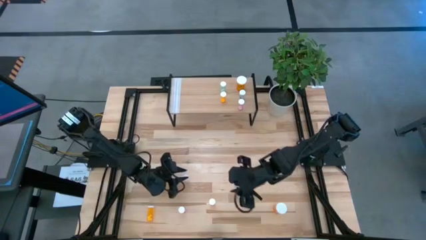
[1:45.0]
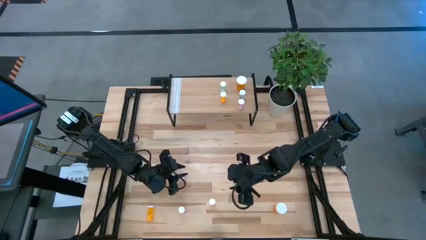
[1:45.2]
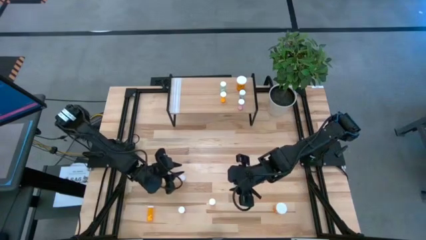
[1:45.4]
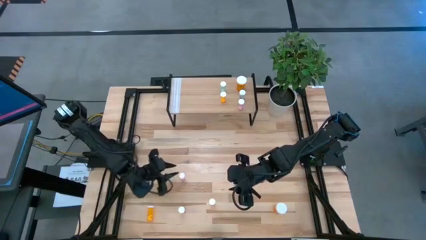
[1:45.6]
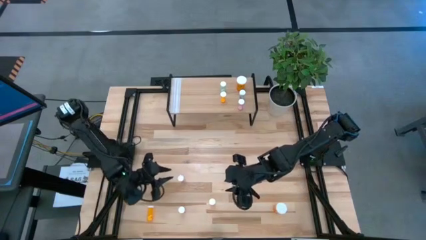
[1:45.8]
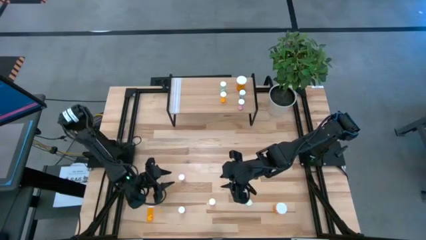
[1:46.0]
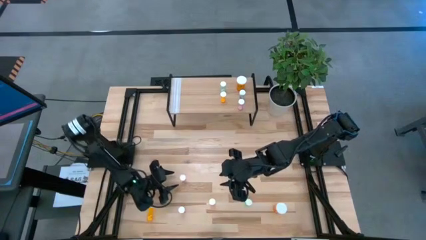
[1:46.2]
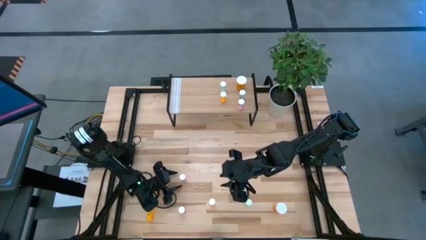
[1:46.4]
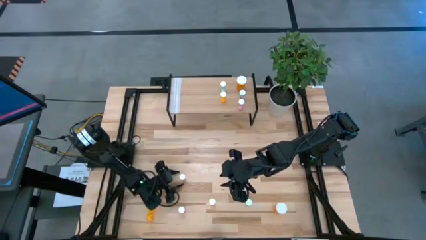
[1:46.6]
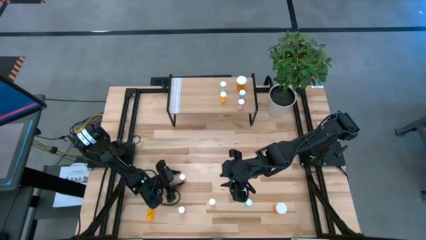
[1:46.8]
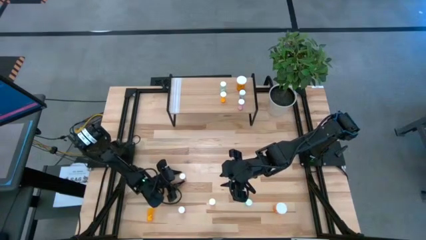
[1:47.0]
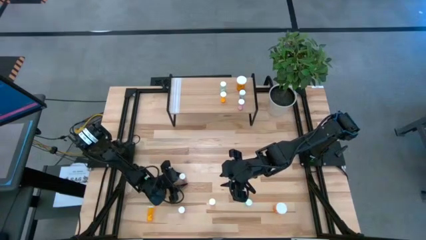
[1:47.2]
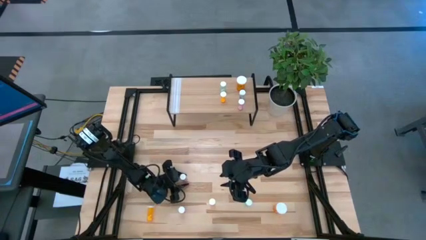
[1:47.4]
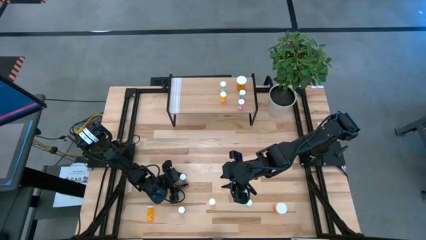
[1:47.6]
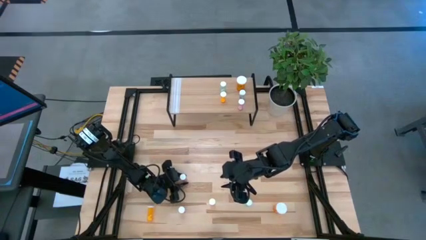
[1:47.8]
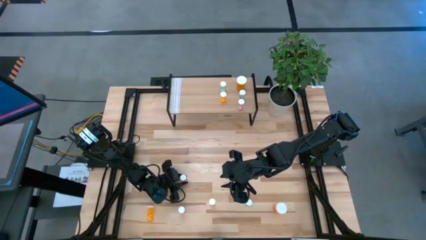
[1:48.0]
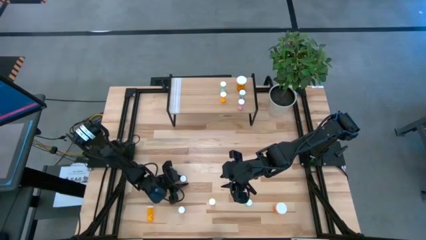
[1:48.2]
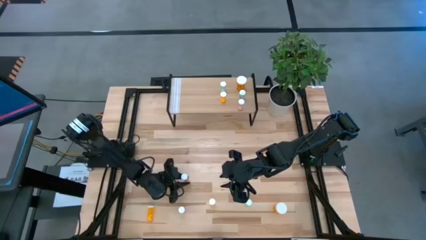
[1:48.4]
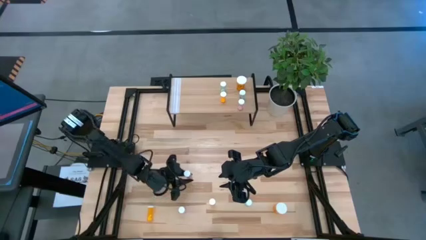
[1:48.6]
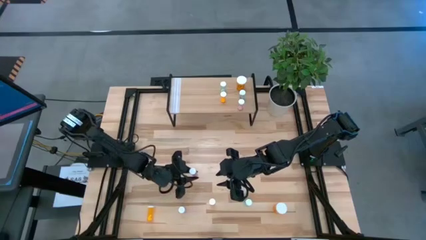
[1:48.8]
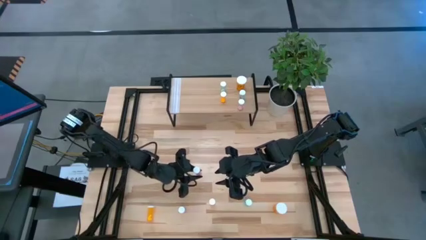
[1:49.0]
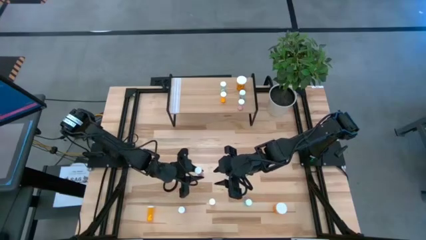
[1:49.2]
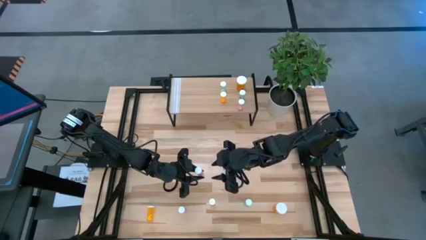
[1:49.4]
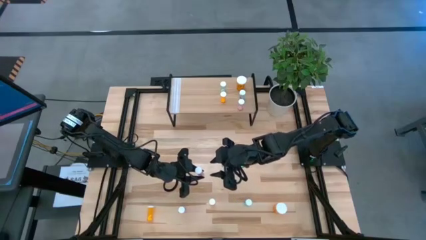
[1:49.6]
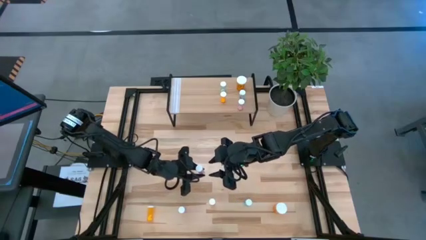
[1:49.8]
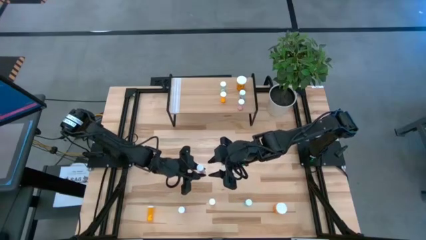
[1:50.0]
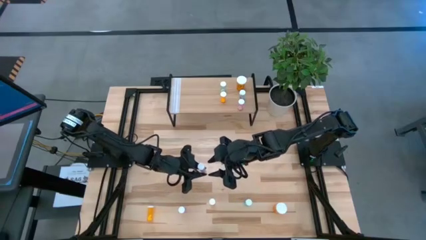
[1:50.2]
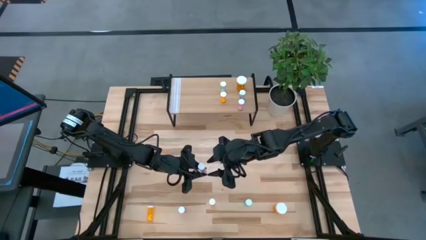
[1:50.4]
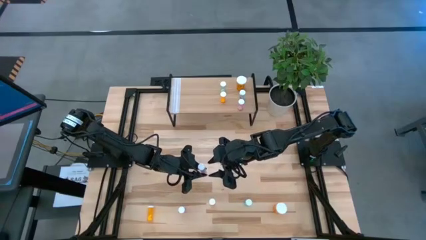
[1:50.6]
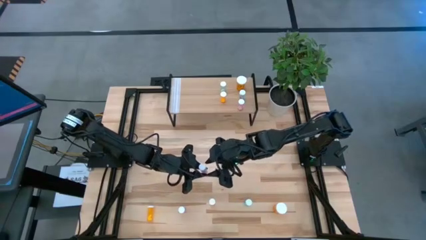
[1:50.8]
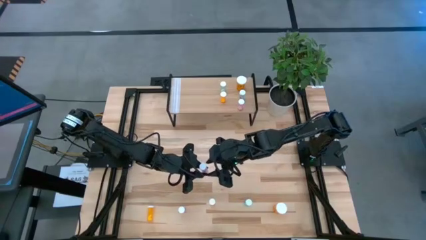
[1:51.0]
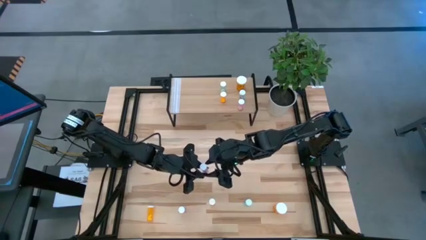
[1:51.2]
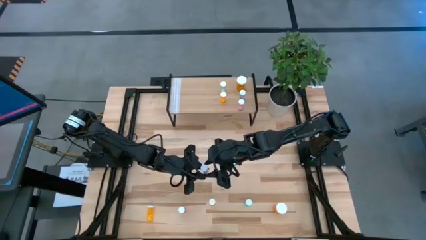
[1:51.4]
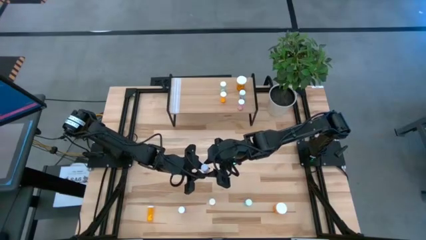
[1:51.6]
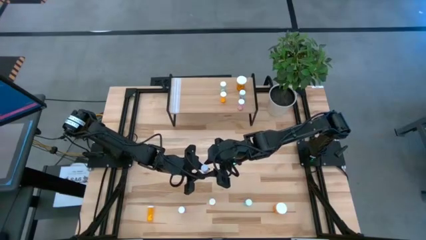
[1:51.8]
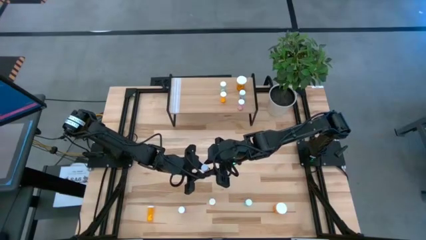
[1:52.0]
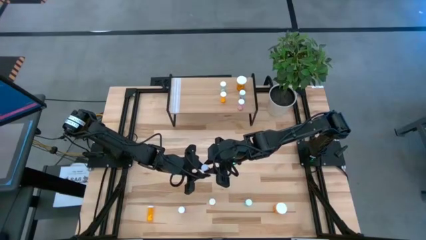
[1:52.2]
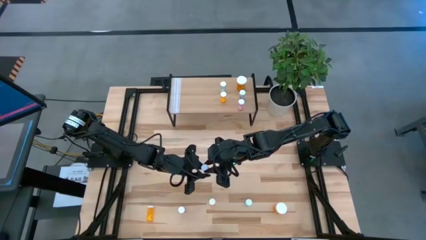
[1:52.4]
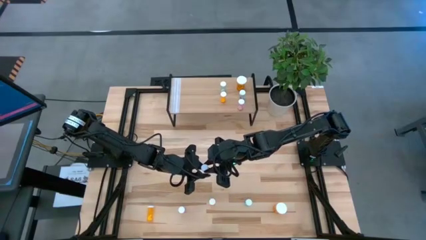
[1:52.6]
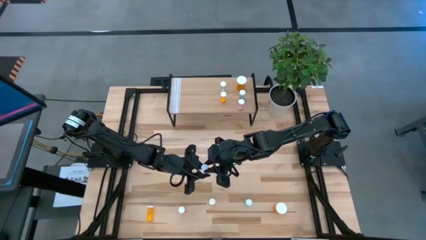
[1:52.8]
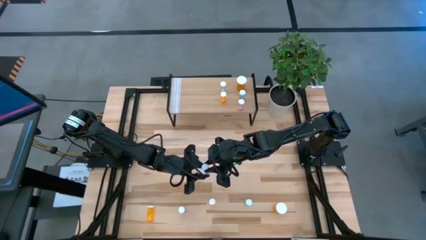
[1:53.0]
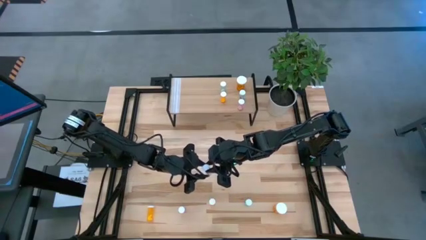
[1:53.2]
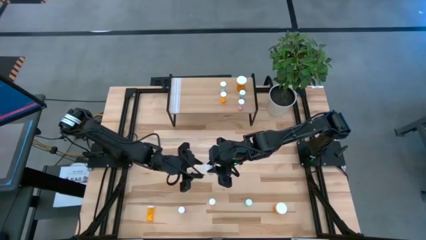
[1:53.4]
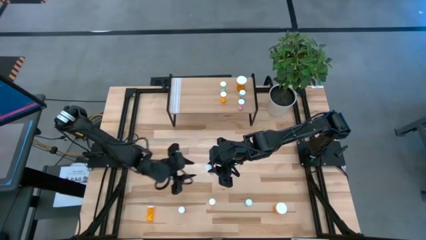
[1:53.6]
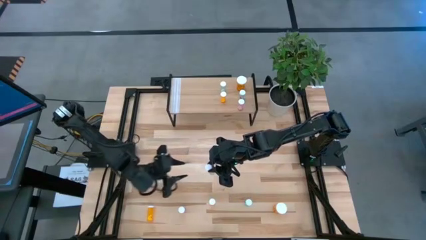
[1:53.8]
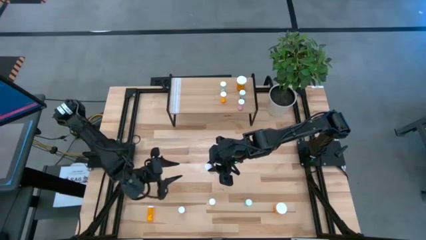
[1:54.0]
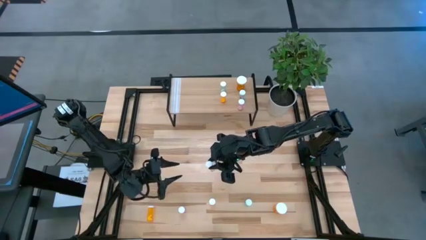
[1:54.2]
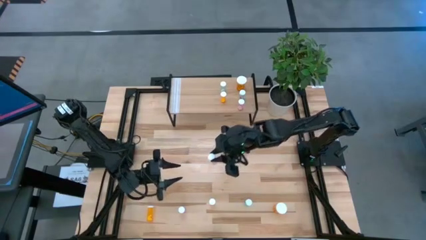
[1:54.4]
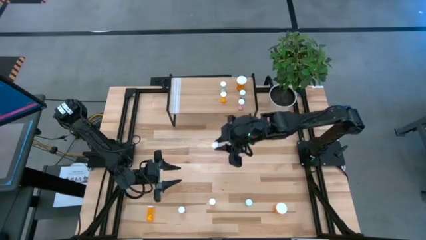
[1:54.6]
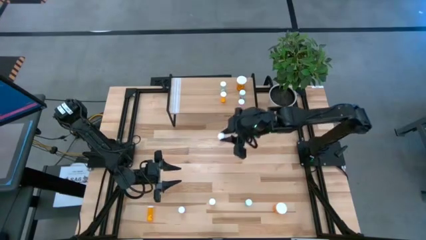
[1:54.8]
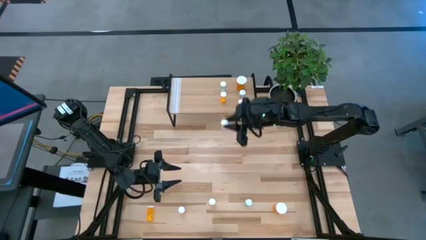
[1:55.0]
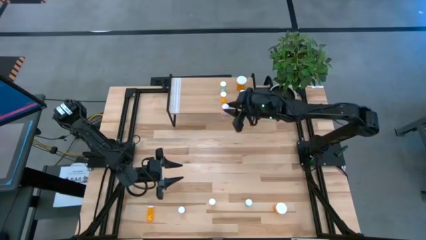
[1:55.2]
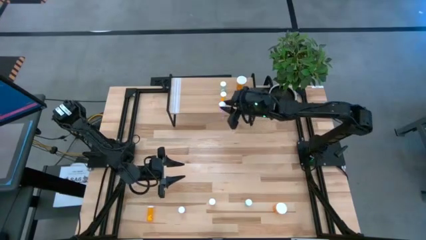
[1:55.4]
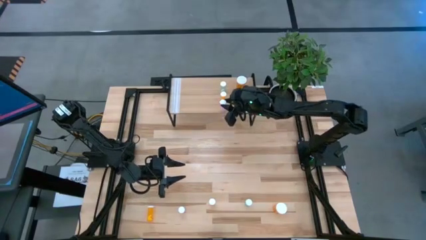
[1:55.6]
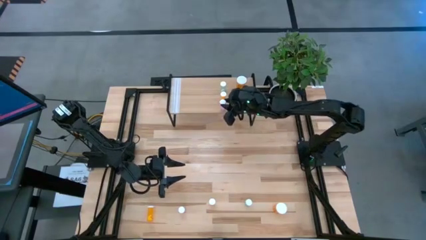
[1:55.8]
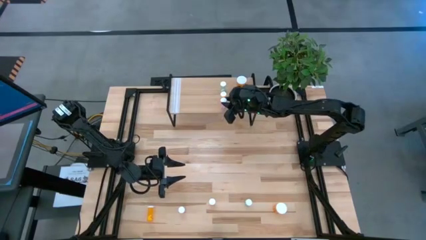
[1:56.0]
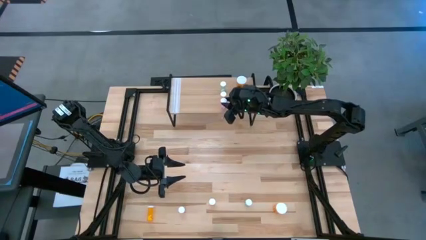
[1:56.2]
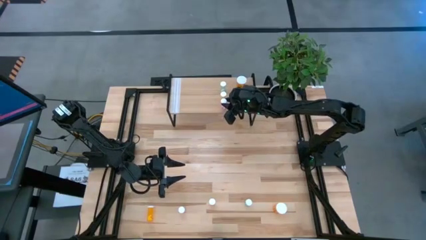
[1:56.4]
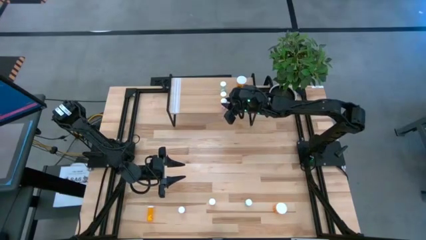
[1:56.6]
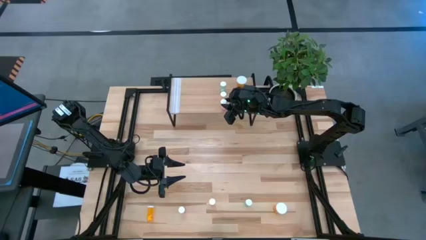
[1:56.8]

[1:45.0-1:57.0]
Task: Pick and place medicine bottles onto shelf by color
Put the top small purple pill bottle on the shelf

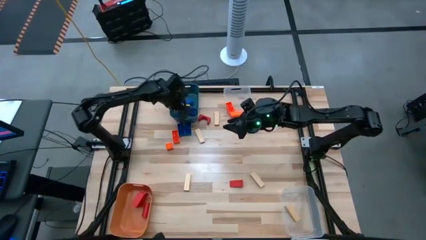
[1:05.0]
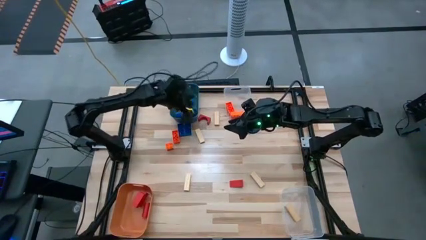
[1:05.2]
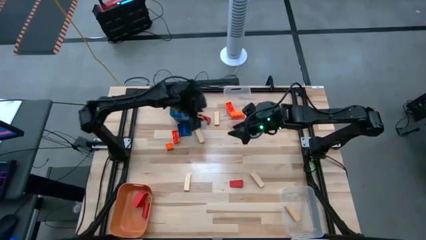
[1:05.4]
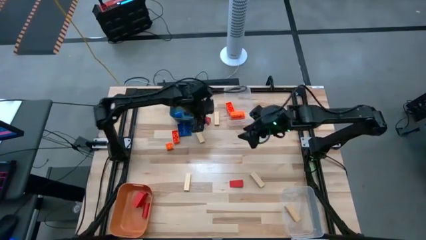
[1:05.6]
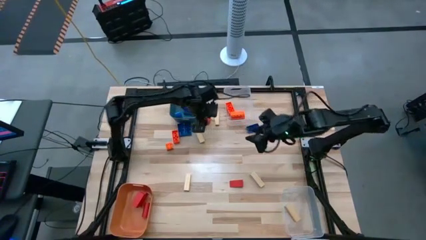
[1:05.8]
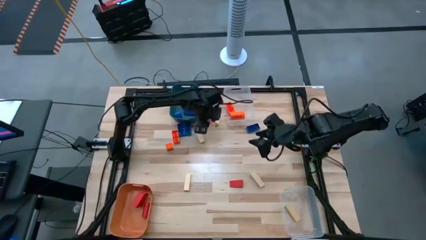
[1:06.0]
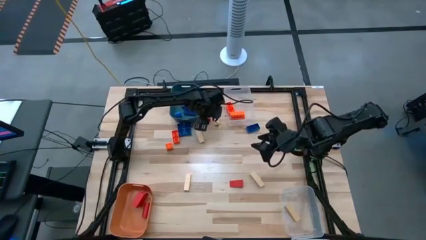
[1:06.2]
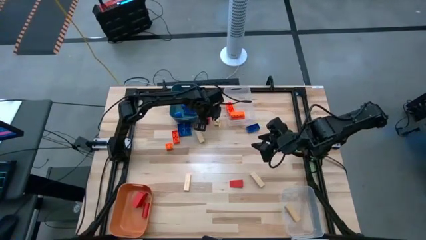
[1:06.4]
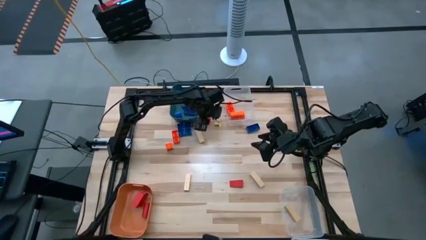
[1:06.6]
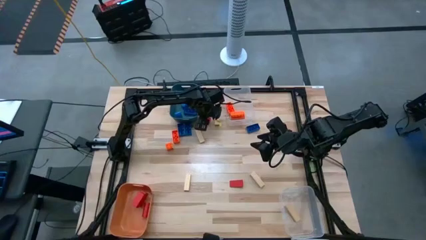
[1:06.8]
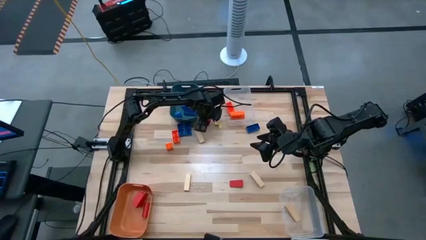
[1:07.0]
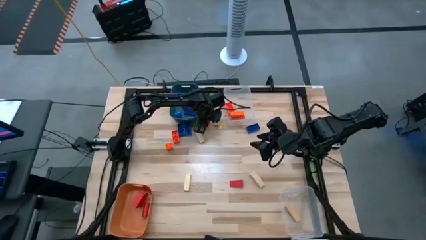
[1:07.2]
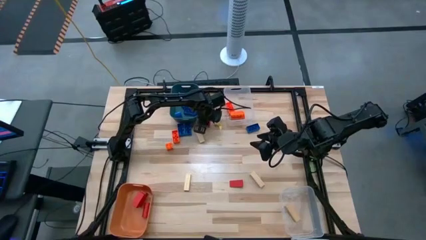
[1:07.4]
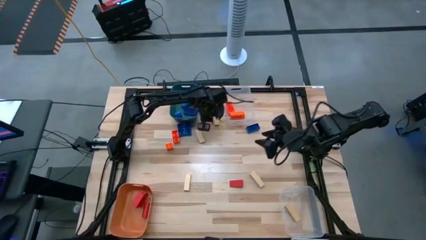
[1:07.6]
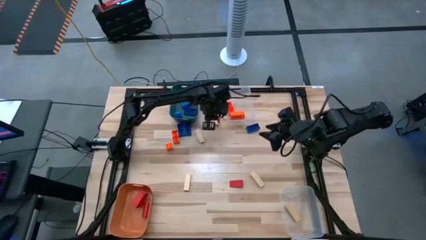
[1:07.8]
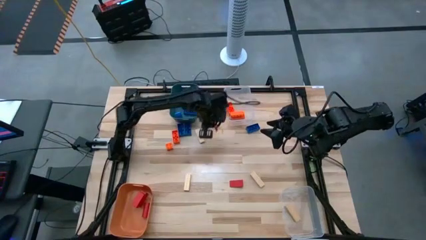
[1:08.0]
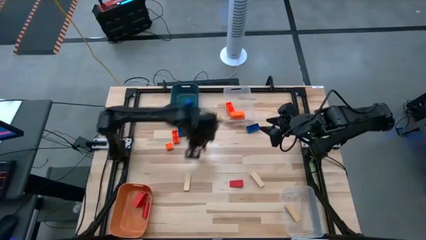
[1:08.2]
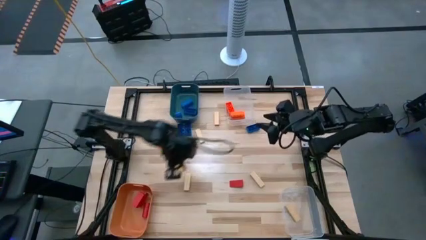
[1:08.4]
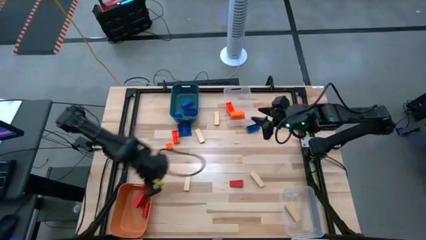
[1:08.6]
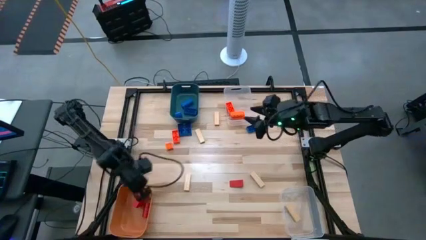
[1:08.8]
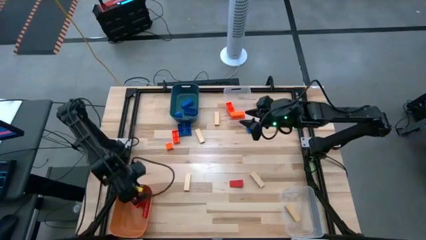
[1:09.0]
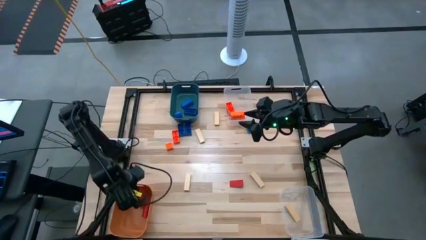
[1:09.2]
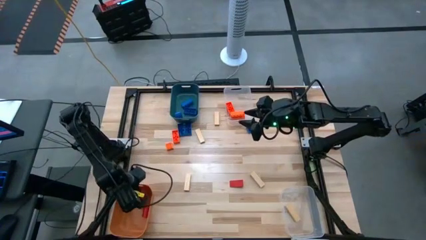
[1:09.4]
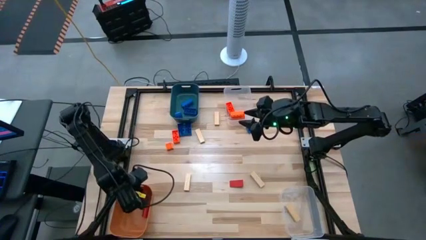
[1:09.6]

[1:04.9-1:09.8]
Task: Sort blocks
Put the red block into the orange bin
